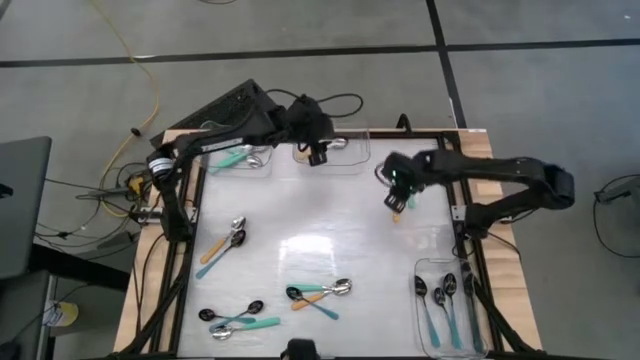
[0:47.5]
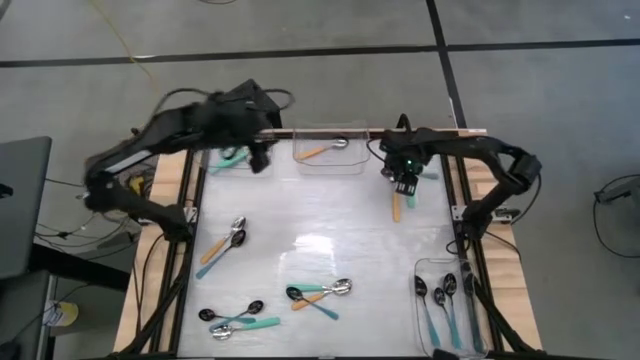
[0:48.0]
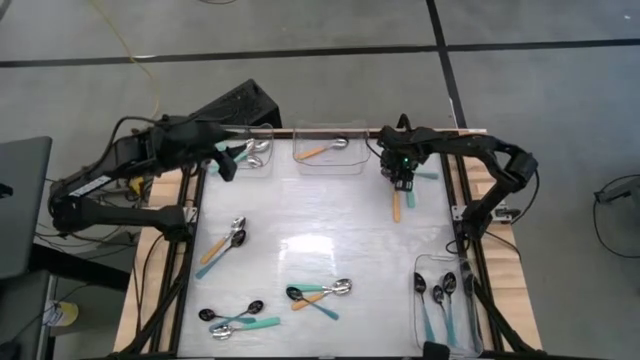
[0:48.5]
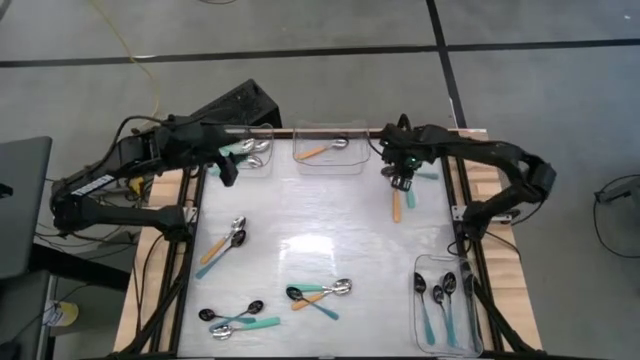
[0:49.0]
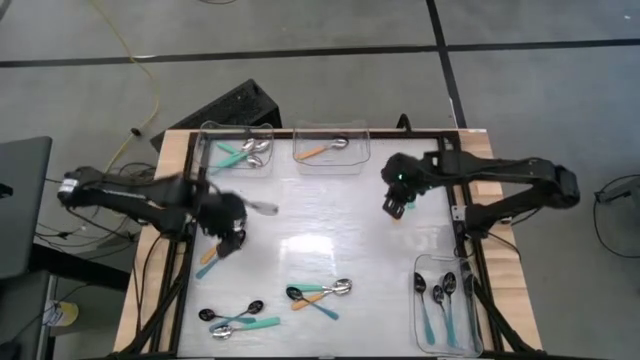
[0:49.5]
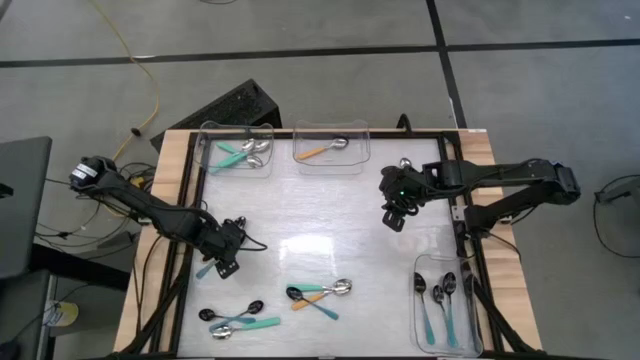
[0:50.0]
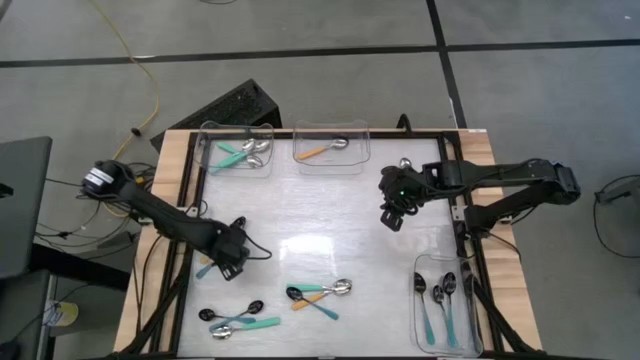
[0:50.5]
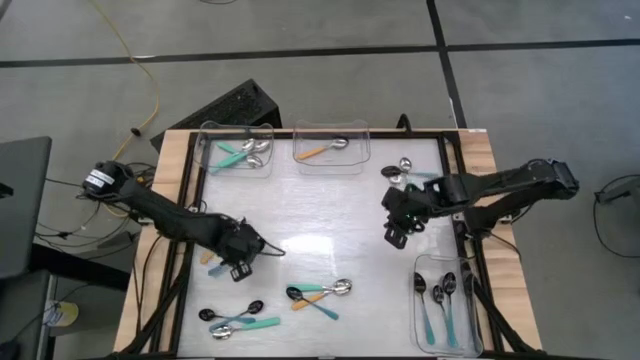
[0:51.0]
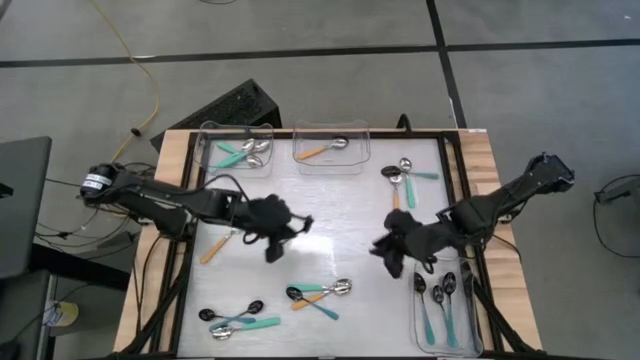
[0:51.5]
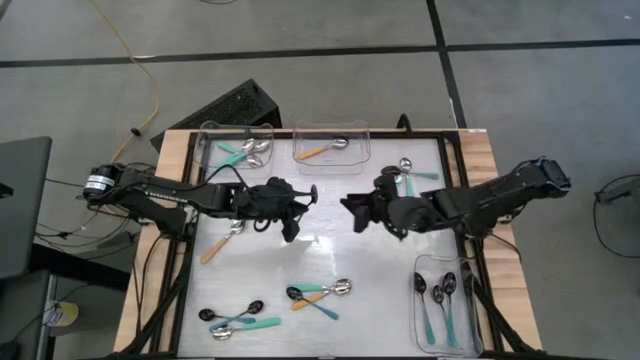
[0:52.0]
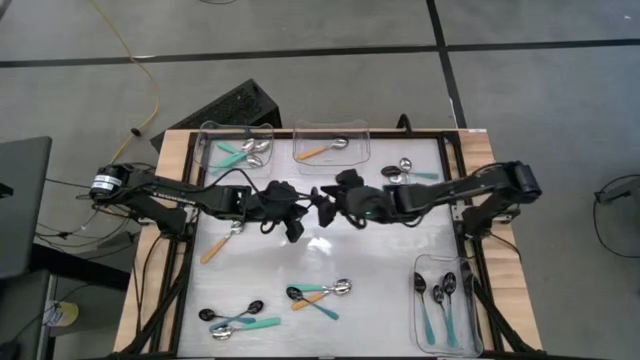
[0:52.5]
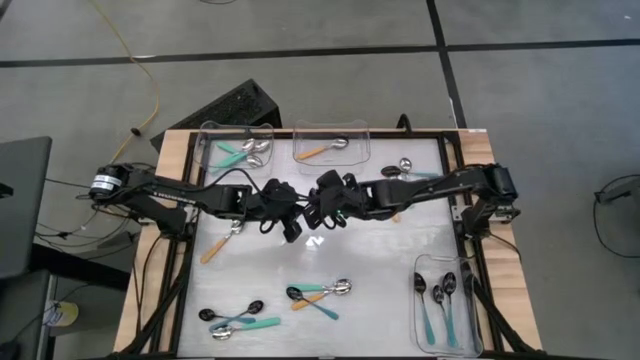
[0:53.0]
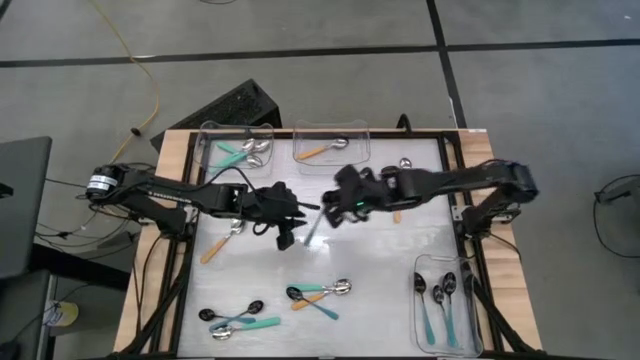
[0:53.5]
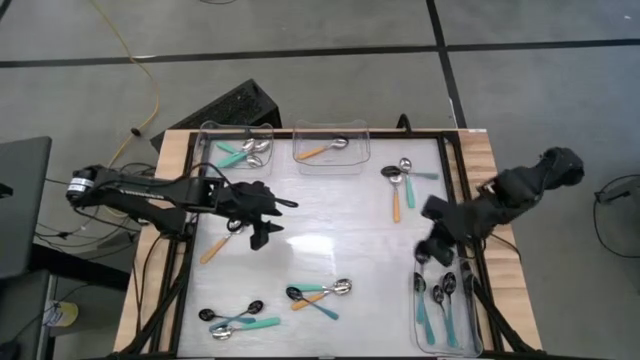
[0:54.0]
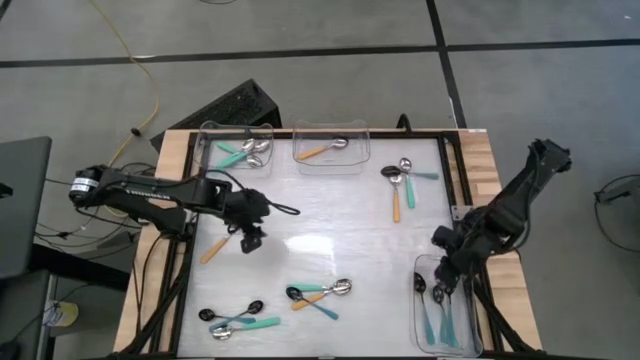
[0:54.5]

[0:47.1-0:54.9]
Task: Sort silverware by color (type)
Put the blue spoon into the bottom transparent bin

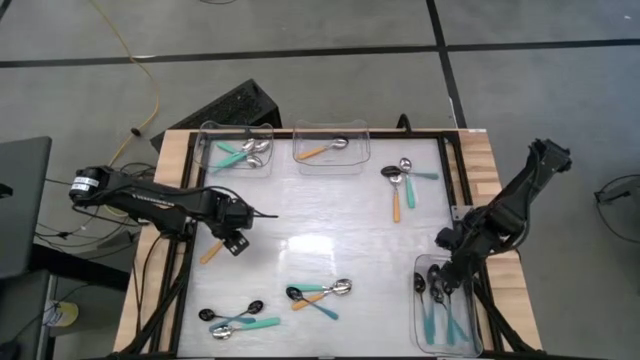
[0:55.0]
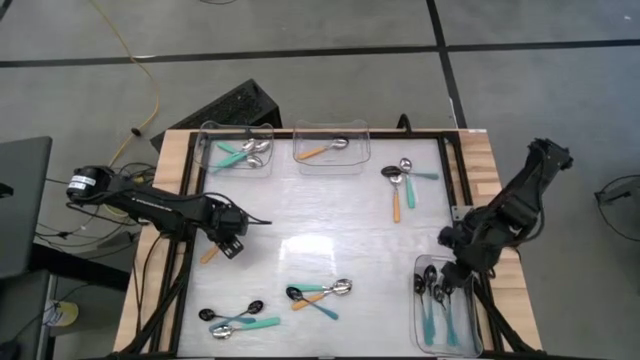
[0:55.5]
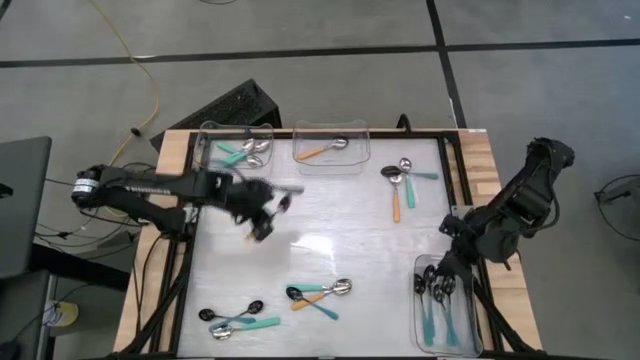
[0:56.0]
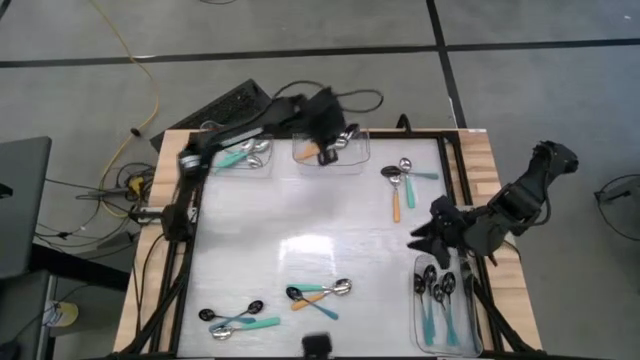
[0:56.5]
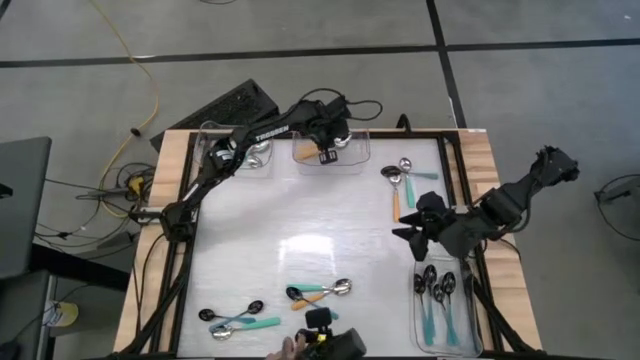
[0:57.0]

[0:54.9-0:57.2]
Put the yellow spoon into the top right transparent bin

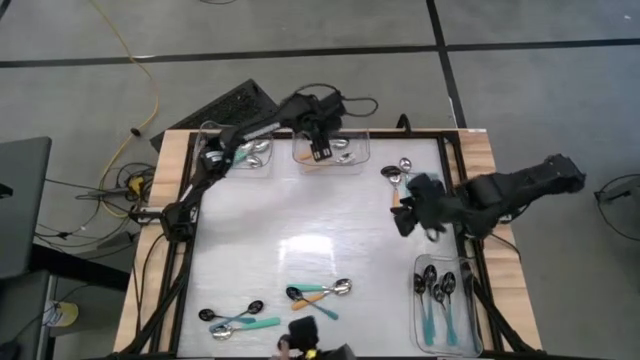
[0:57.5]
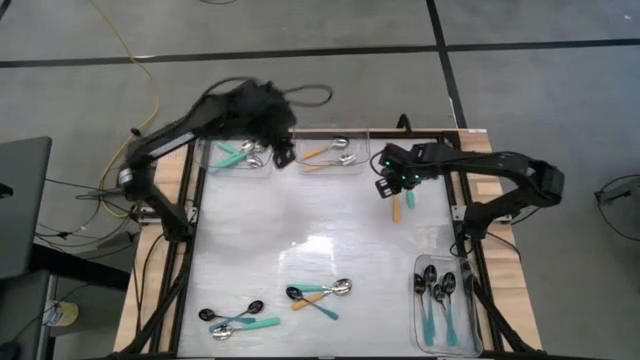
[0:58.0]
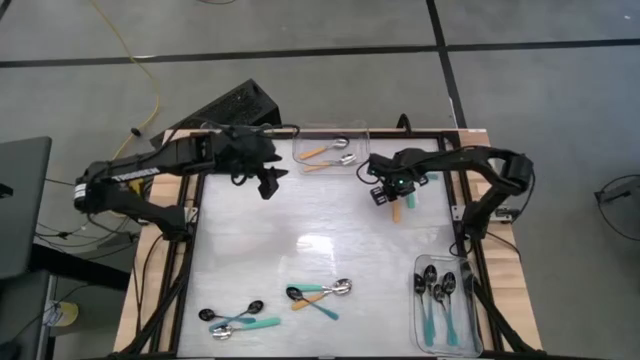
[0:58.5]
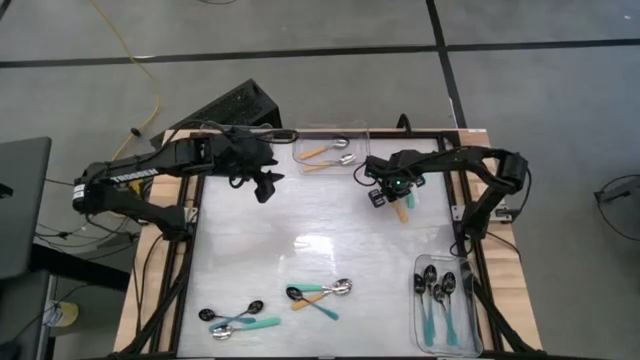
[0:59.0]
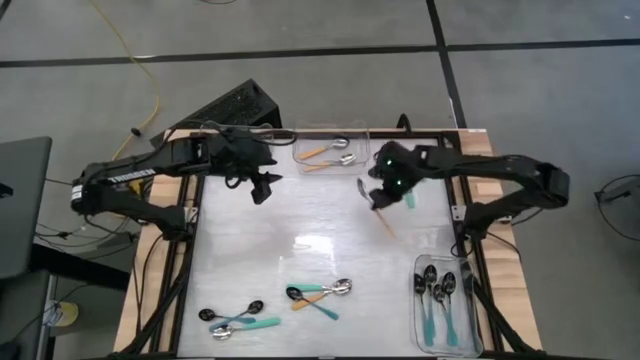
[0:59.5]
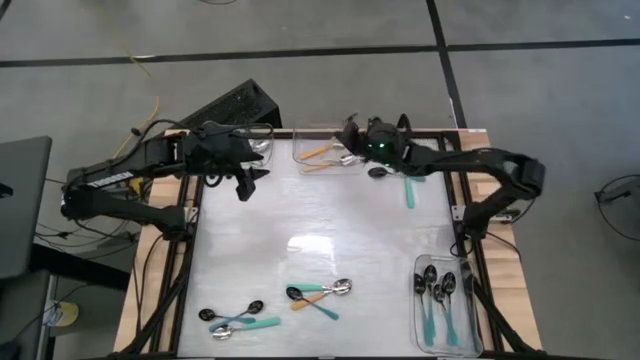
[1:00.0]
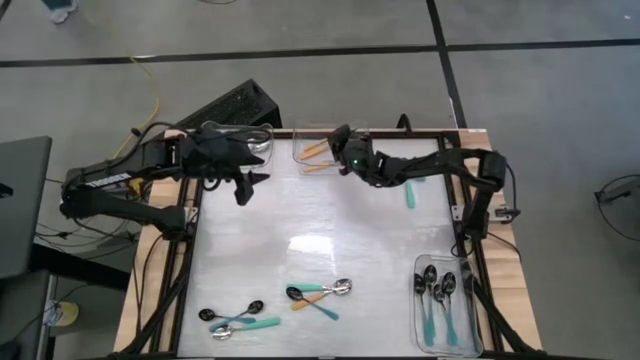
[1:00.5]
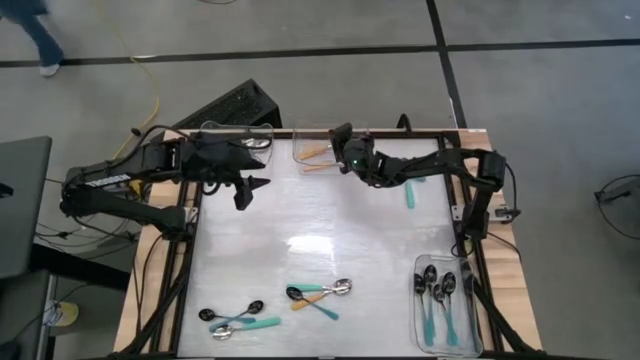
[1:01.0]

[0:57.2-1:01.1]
Put the yellow spoon into the top right transparent bin

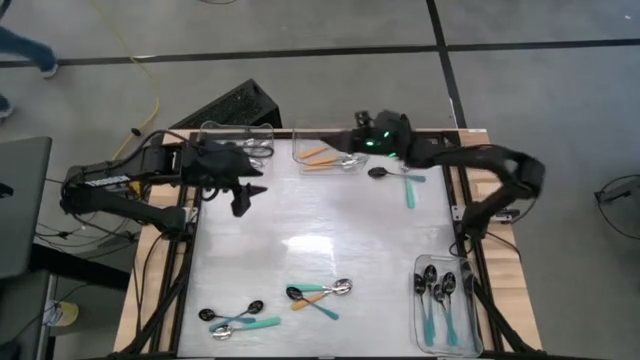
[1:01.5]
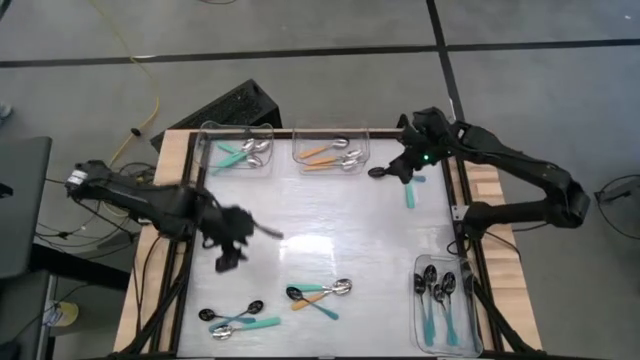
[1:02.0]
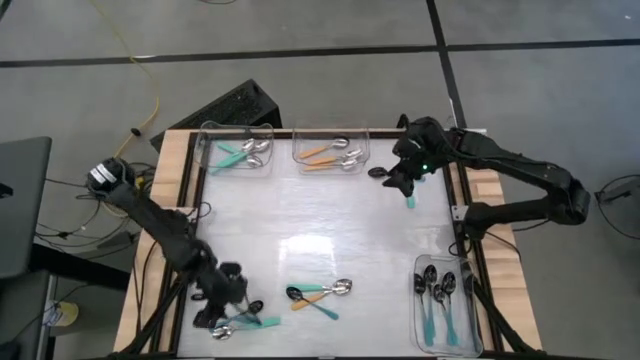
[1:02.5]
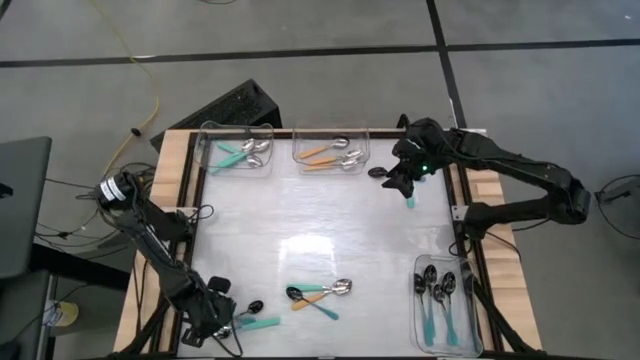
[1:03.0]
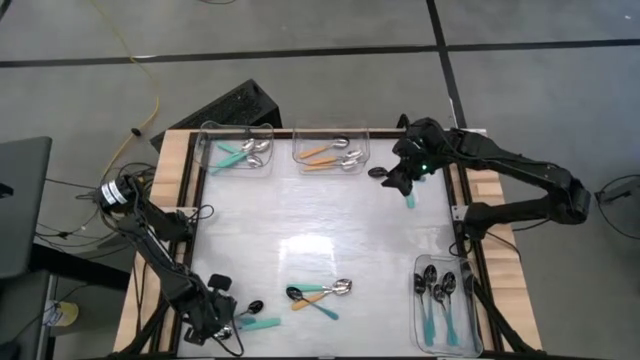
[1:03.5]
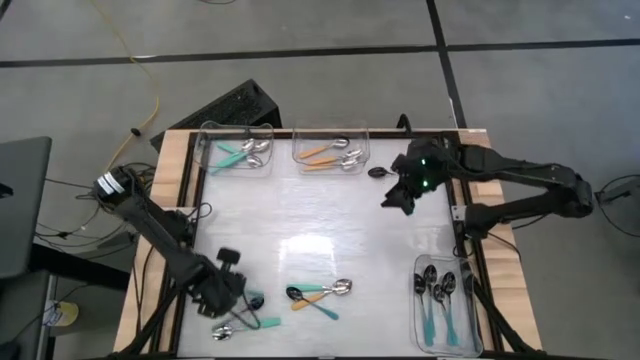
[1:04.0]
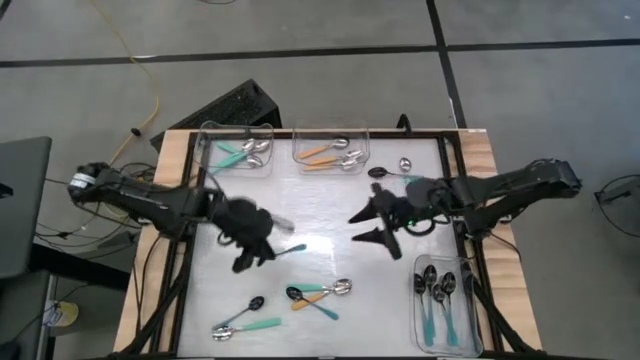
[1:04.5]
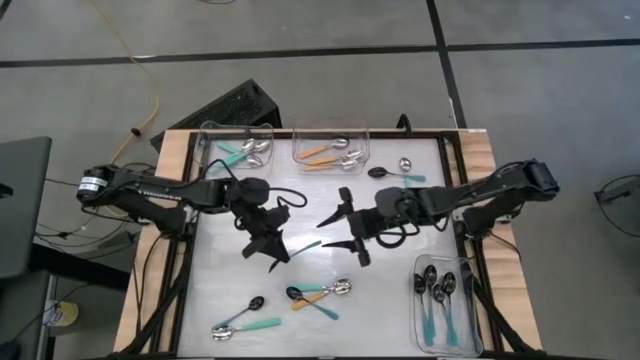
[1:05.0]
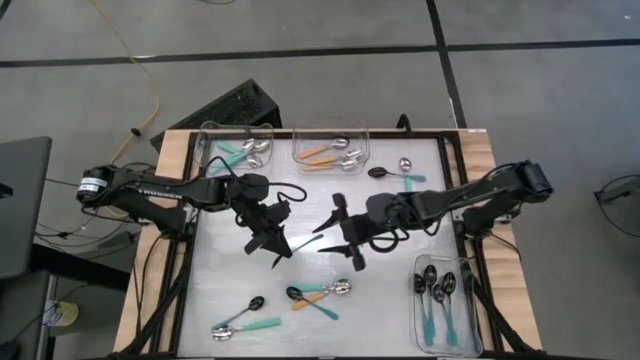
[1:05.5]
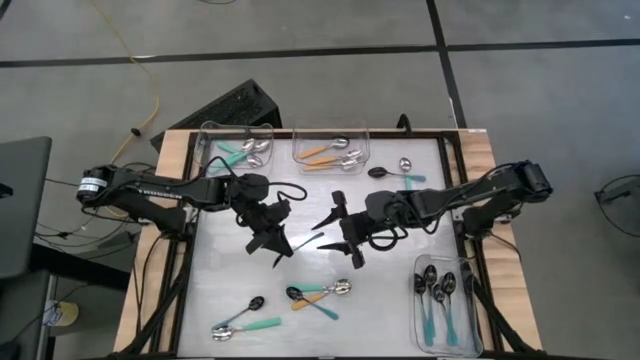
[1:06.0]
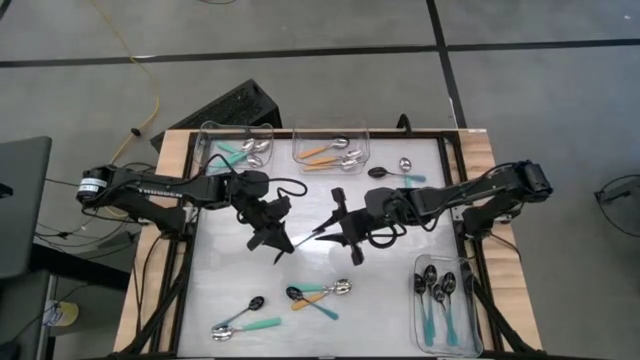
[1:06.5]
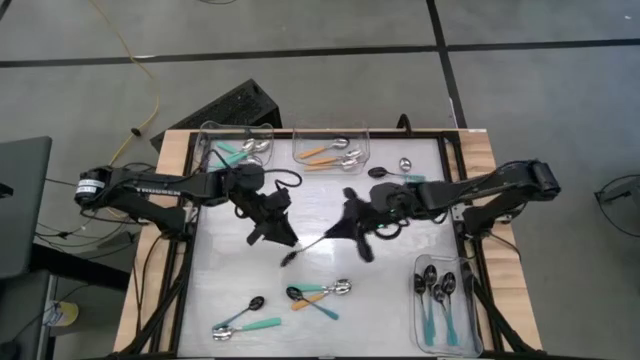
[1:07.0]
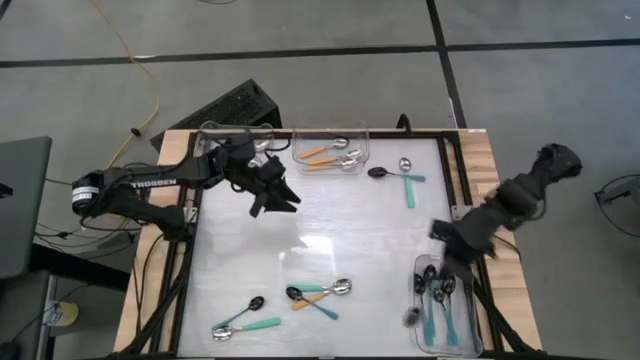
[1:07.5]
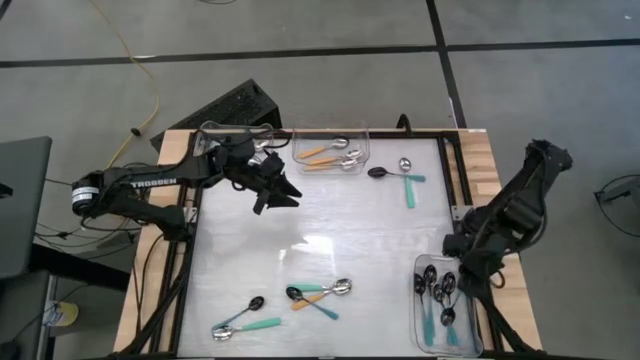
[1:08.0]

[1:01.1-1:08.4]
Put the blue spoon into the bottom transparent bin

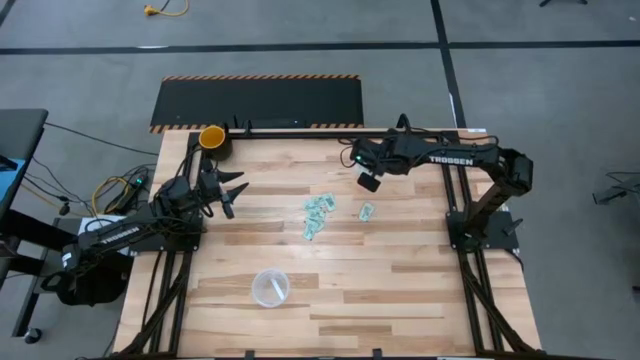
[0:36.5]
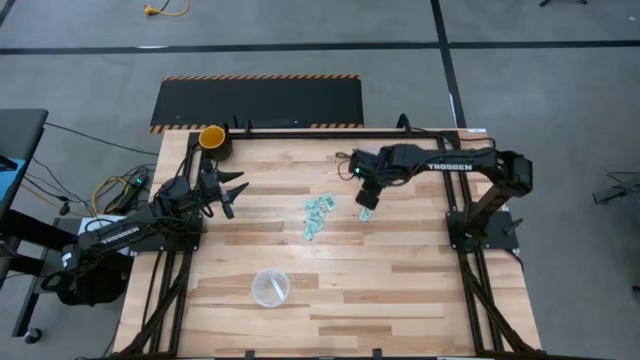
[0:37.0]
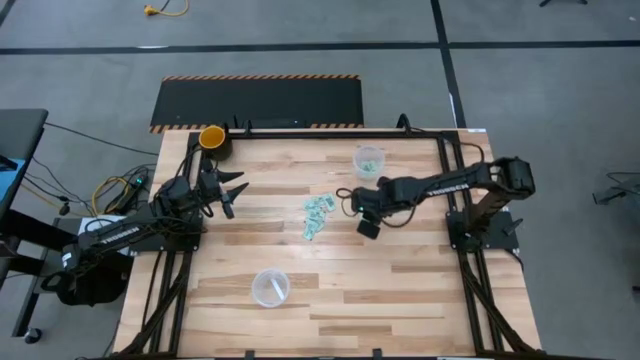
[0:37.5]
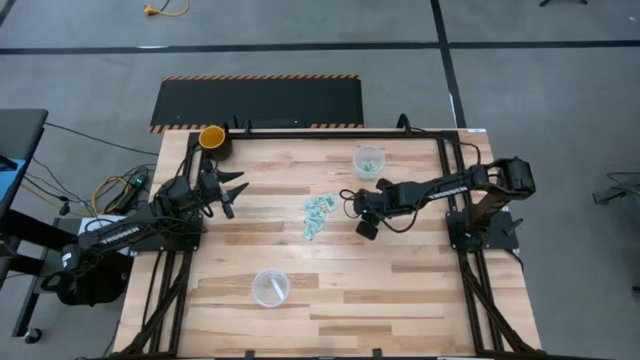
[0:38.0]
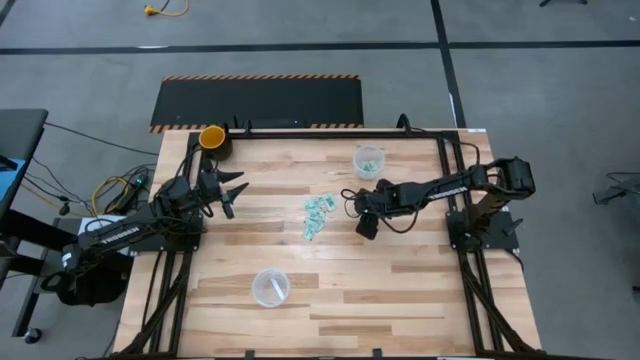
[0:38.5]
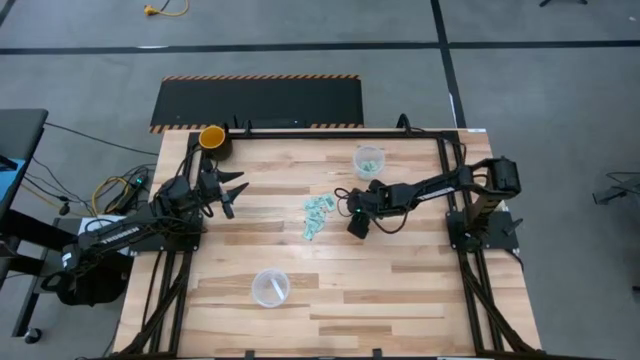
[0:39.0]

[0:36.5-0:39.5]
Task: Pick and place Stevia / Truvia into bins
Put the stevia packet into the top container
